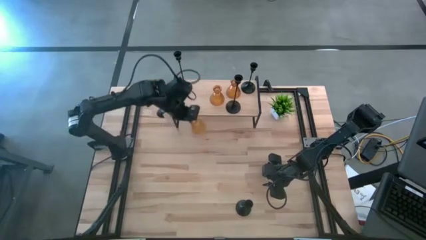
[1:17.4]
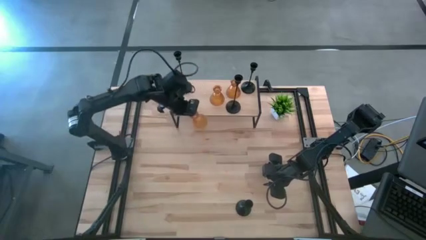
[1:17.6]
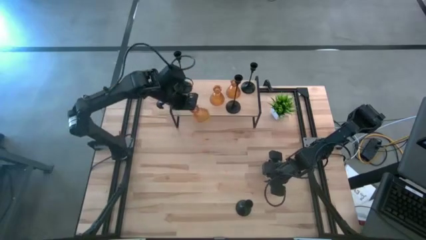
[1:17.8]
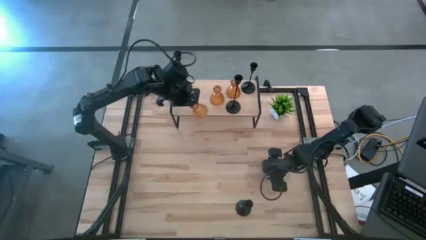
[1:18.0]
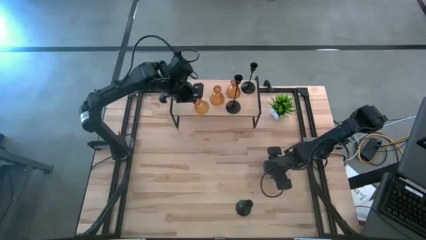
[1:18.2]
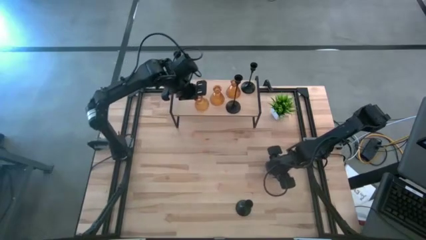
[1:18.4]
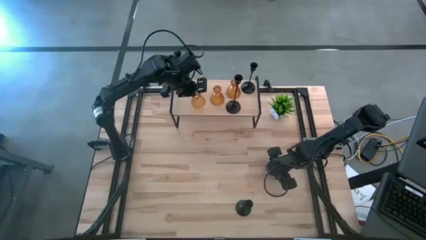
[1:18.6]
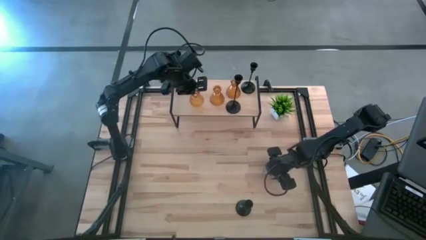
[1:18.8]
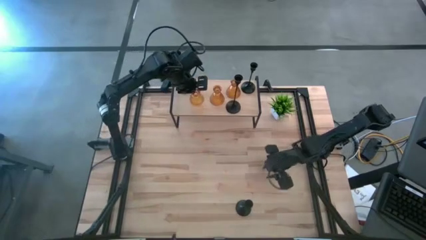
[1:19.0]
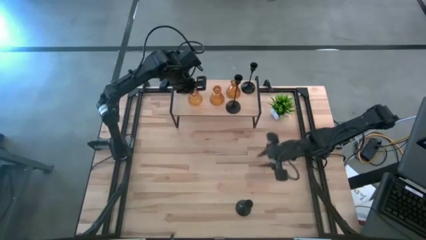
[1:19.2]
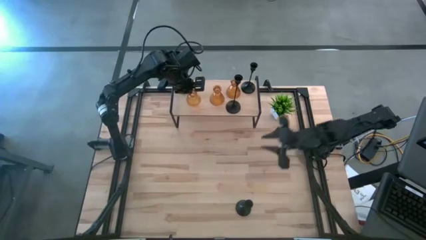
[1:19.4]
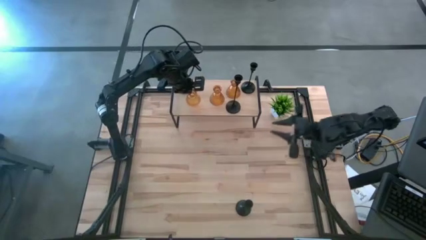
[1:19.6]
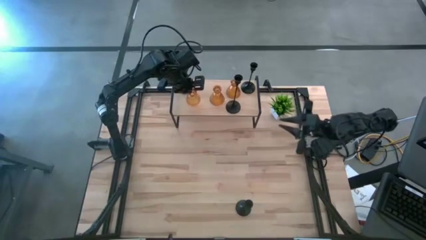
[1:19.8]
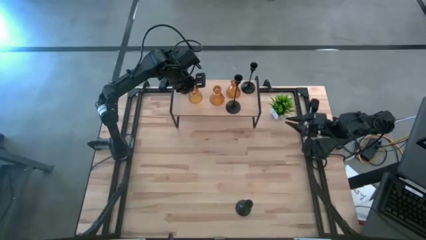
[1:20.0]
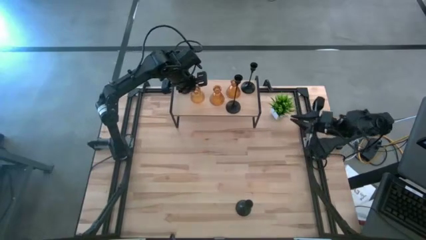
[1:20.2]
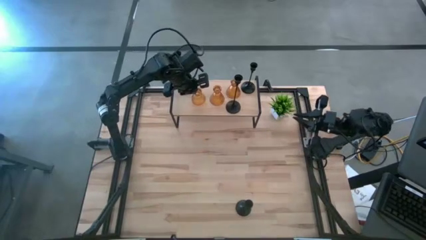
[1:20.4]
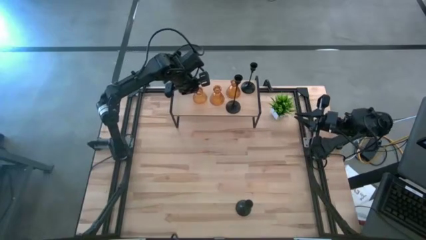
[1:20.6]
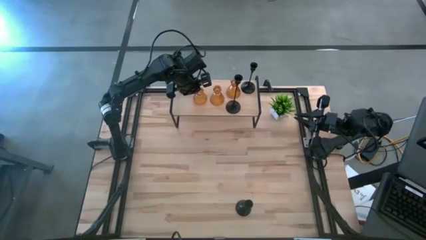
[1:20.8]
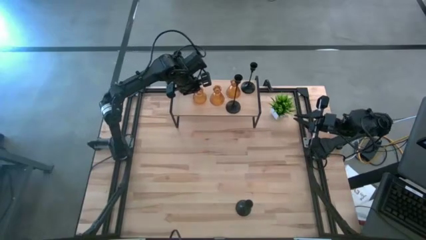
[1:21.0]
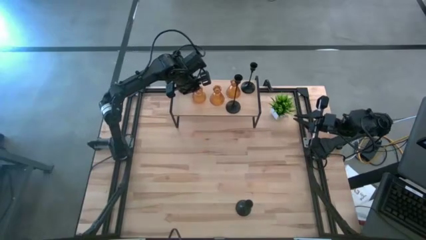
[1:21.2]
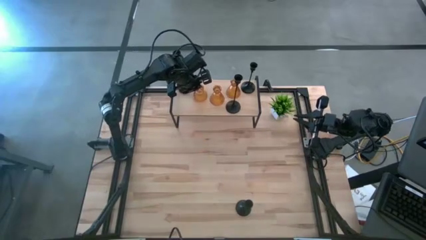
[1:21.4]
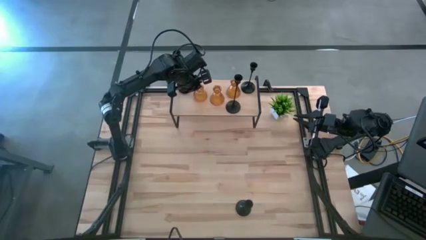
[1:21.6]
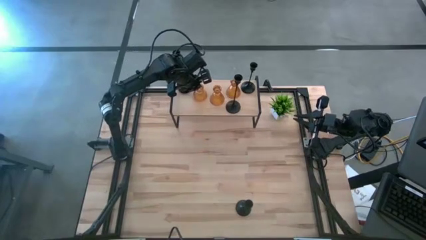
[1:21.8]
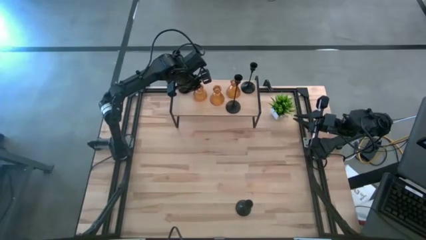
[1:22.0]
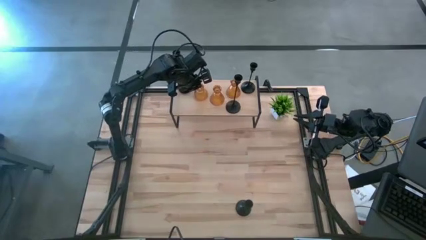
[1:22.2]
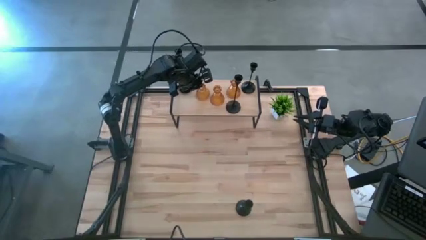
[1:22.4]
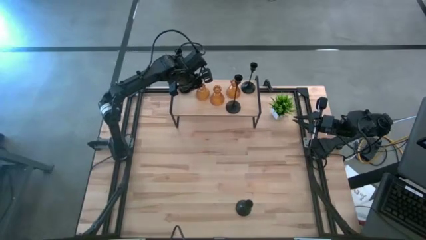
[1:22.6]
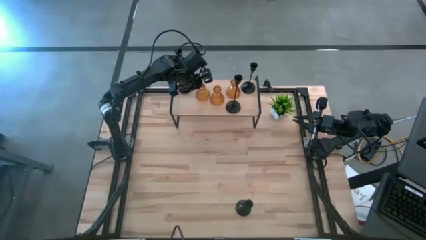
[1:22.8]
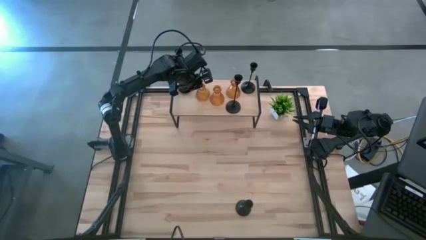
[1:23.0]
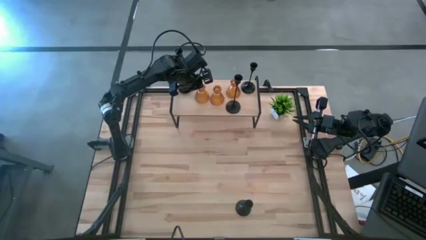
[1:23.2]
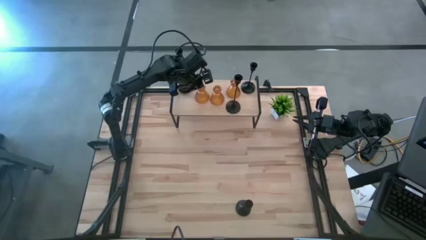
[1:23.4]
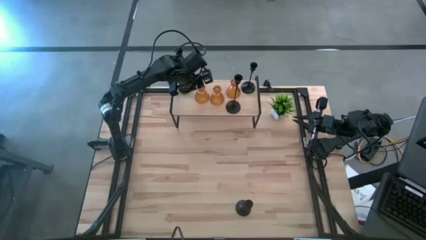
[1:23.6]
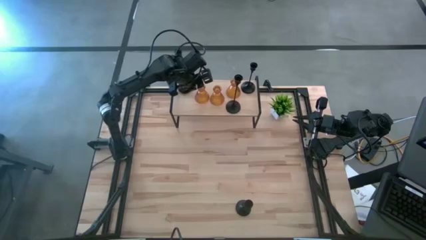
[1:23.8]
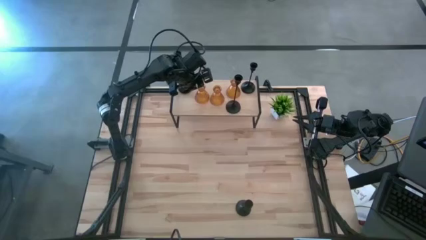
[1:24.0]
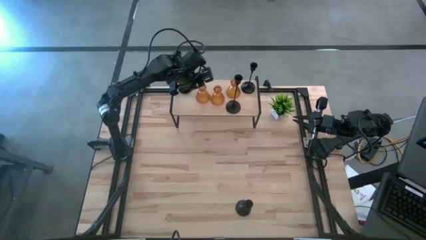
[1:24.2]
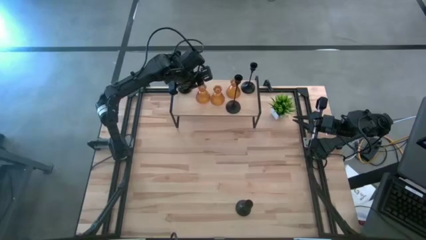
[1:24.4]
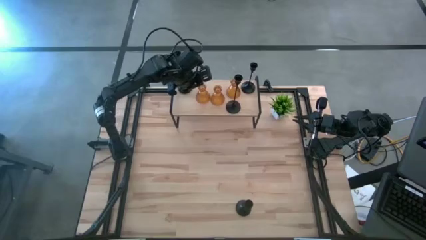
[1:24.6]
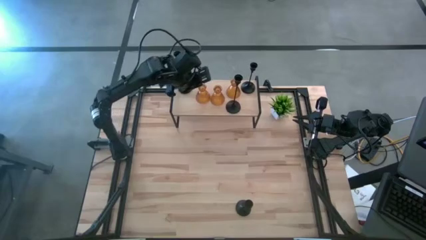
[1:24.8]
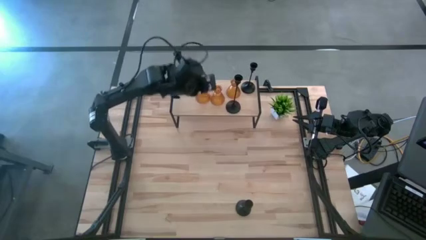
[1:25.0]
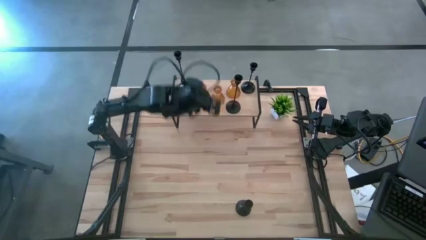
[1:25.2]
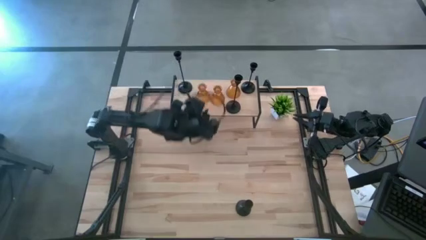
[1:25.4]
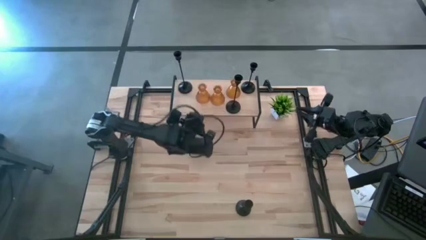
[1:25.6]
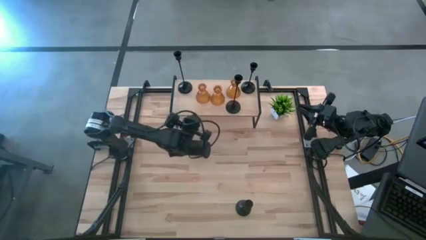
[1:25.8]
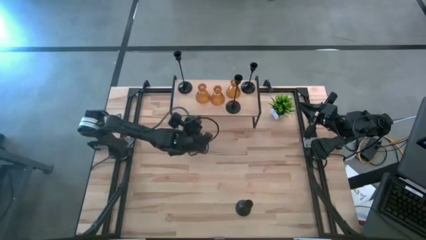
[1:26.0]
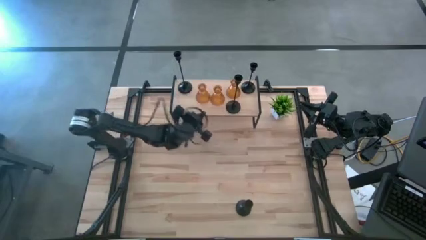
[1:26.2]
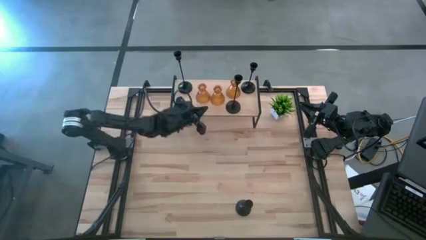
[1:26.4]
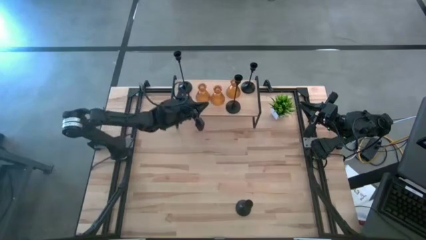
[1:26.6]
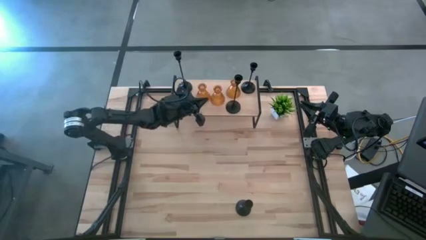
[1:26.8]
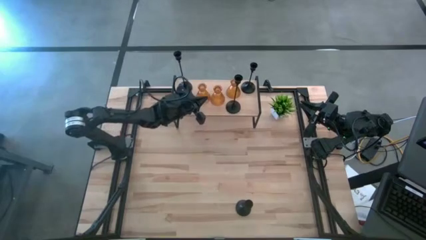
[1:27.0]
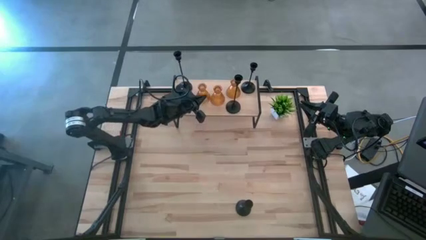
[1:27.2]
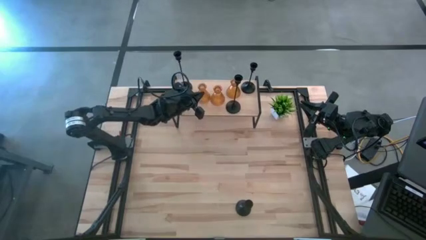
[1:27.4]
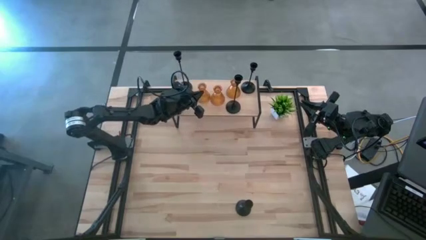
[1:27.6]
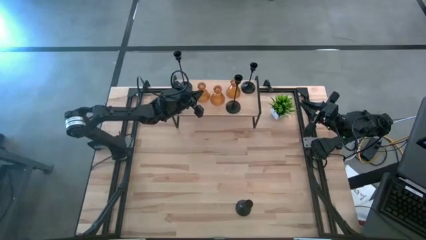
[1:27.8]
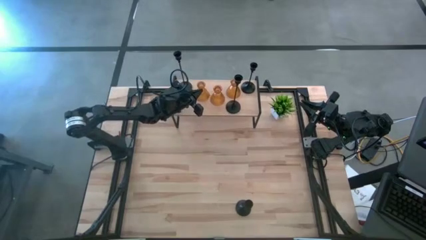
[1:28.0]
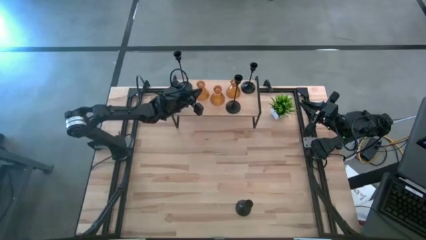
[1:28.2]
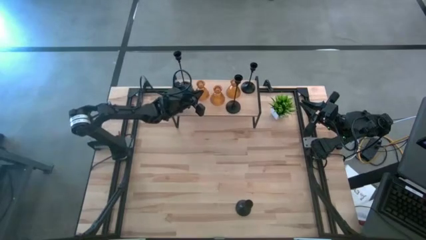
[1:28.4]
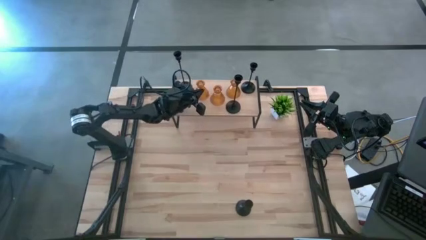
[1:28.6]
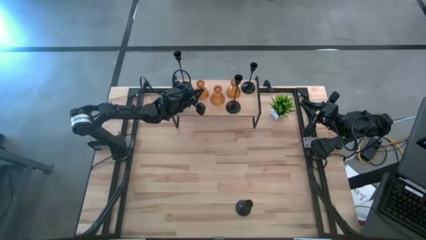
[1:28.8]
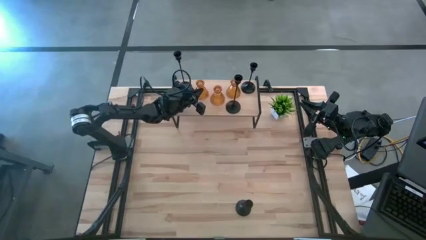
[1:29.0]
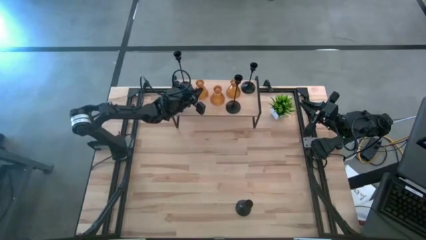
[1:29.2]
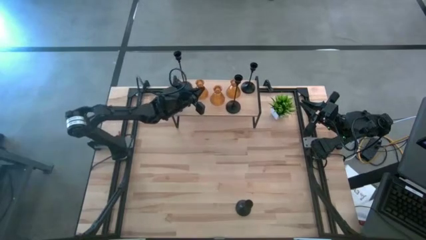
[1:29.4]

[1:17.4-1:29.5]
Task: Pick & Place candle stick holders
Put the yellow glass candle holder on the shelf
